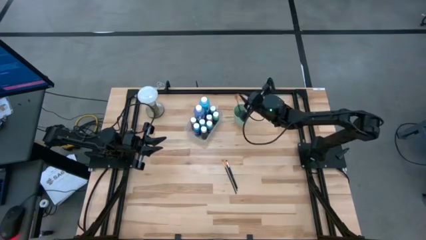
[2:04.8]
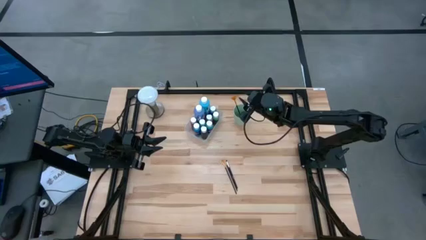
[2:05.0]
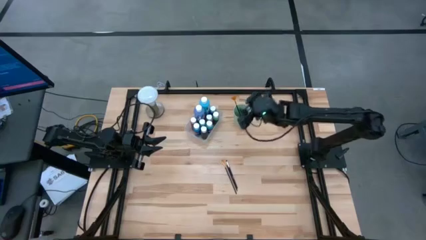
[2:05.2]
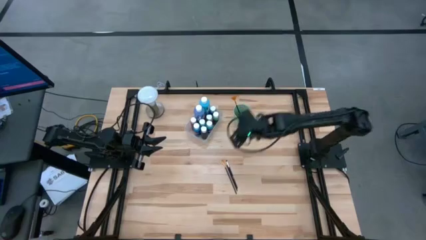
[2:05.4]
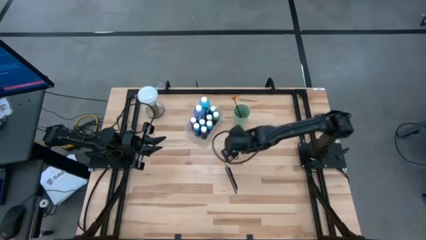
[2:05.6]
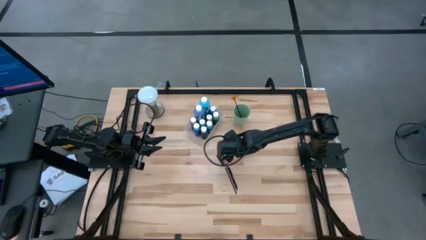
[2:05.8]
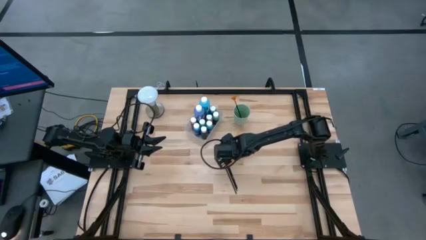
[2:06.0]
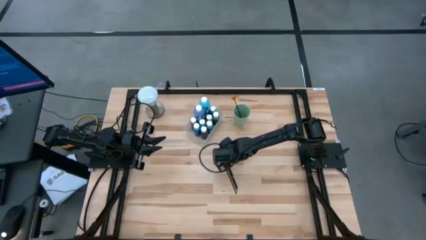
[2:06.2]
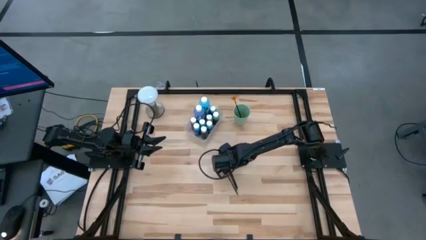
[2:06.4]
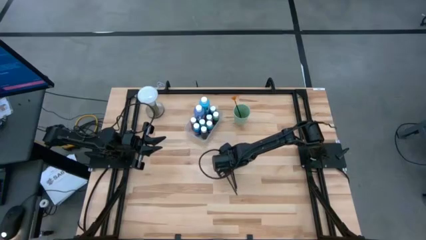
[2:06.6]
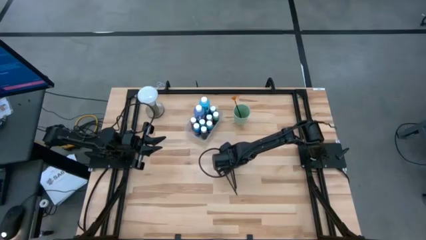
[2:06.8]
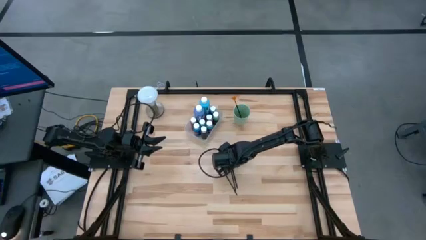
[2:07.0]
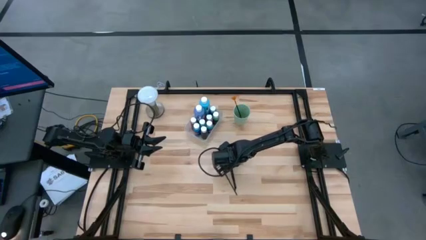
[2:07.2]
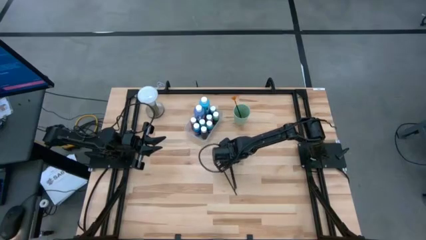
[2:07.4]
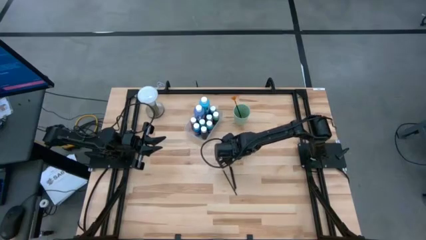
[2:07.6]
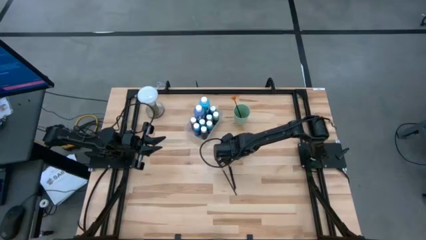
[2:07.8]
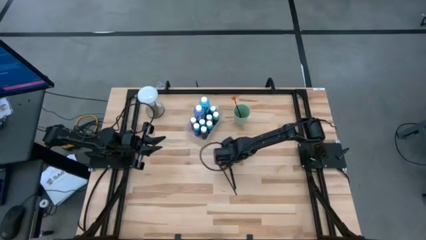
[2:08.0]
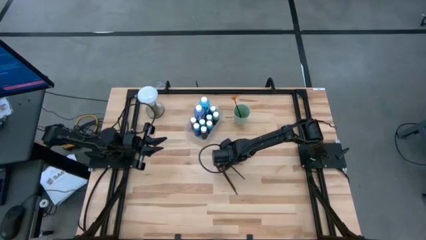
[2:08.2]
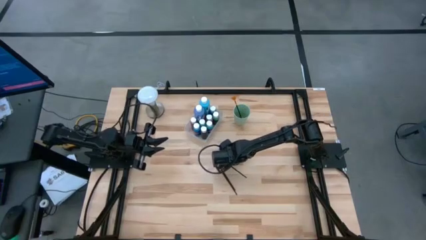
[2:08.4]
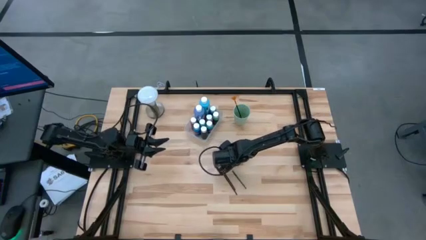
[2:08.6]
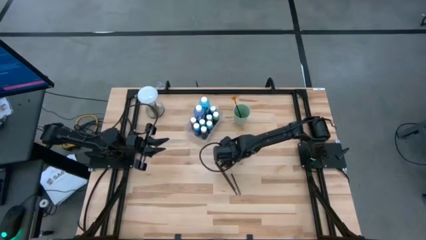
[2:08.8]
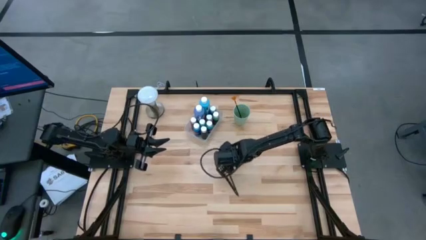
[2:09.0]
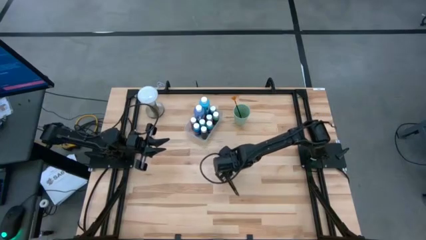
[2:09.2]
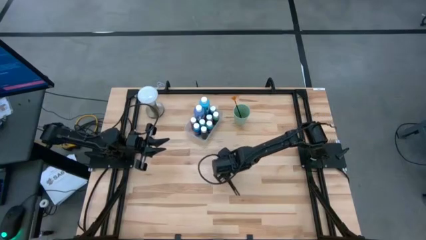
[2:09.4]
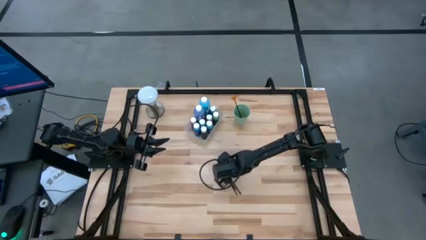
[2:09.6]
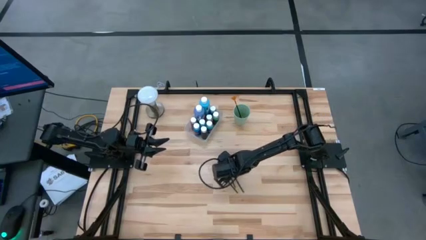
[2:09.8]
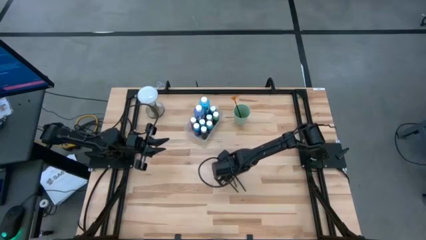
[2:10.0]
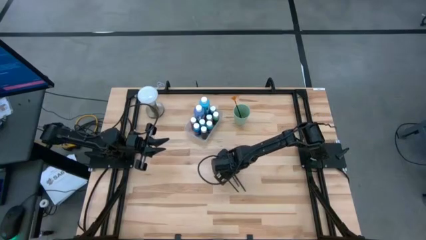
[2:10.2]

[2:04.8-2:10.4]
Task: Pick & Place Paint Supplies
Put the black paint brush into the green cup

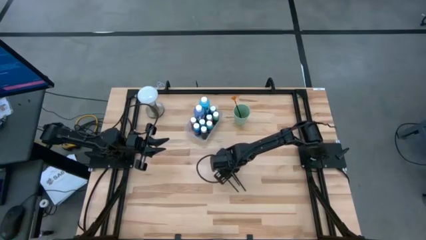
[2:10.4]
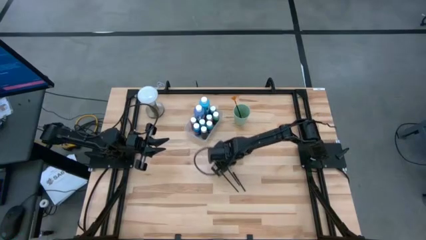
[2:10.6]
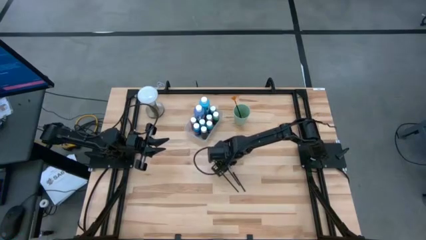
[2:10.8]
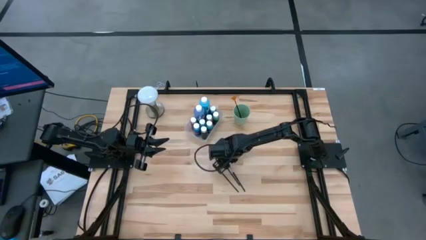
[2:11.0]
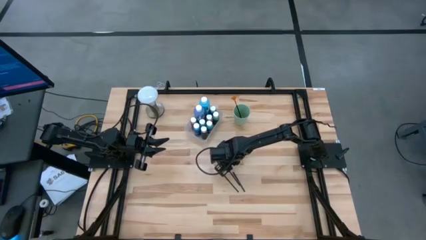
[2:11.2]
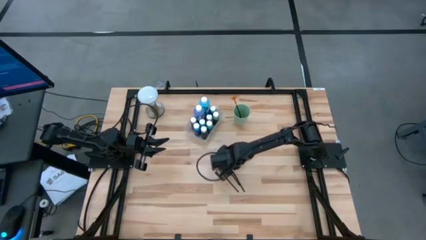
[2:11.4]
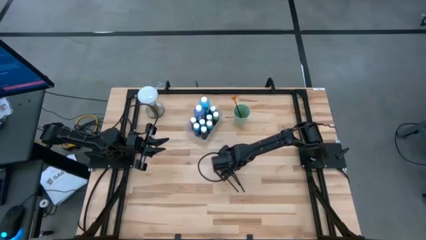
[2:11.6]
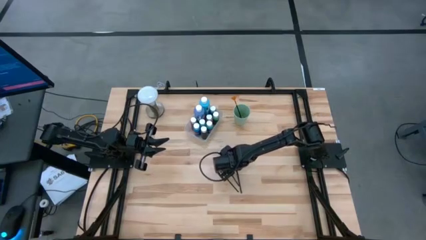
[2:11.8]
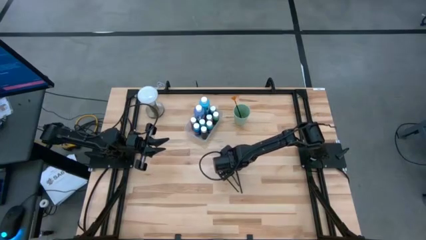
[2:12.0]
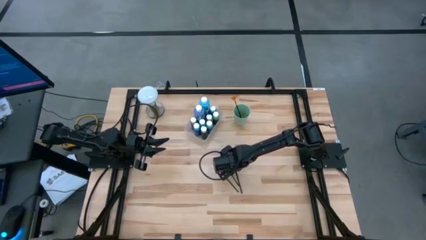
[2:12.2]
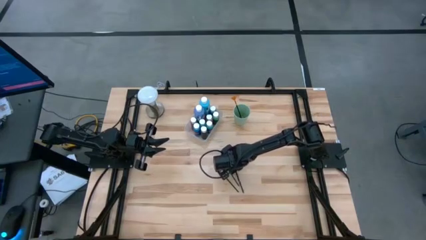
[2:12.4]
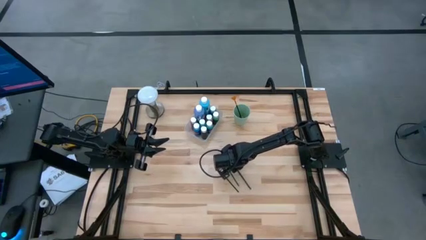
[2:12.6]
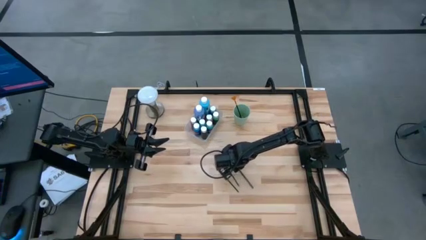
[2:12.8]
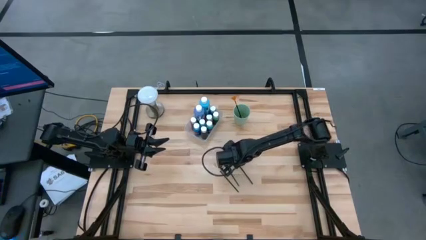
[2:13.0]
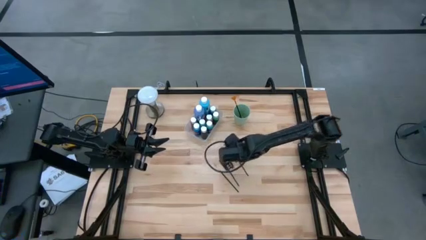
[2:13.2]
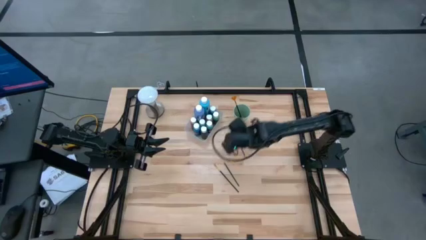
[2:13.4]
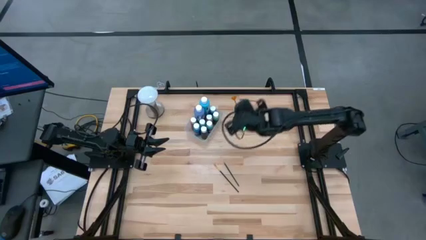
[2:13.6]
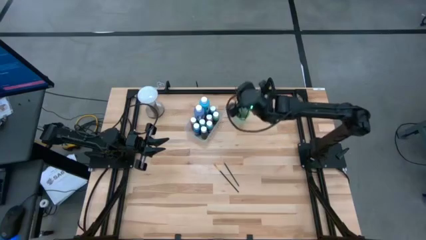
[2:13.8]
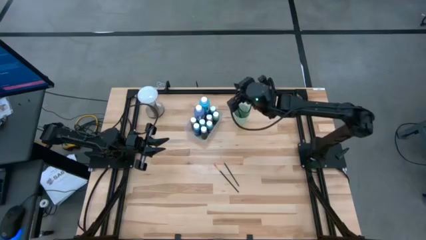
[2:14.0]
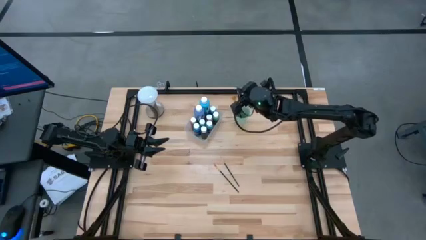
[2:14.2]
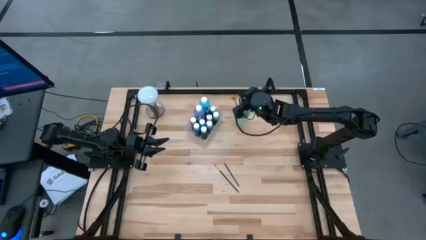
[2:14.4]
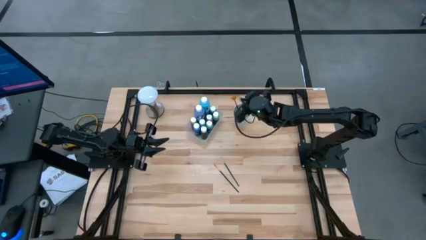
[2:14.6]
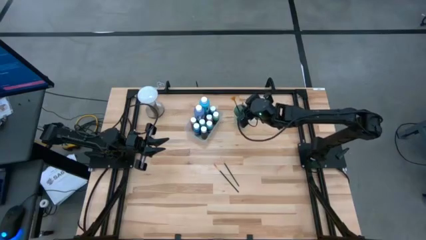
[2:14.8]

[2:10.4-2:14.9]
Put the black paint brush into the green cup

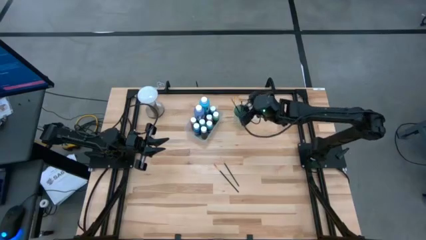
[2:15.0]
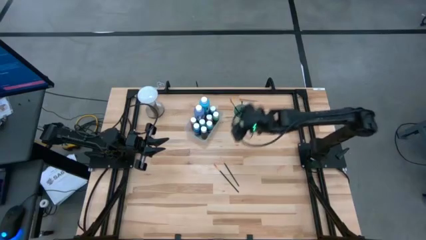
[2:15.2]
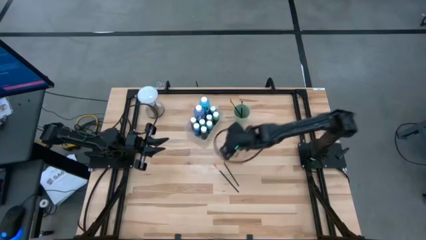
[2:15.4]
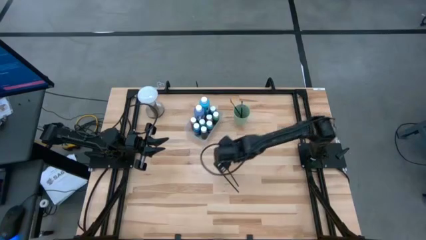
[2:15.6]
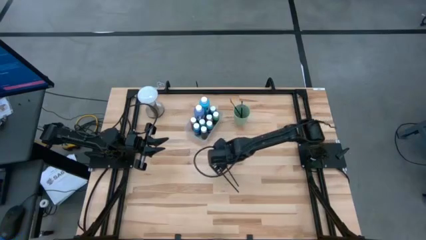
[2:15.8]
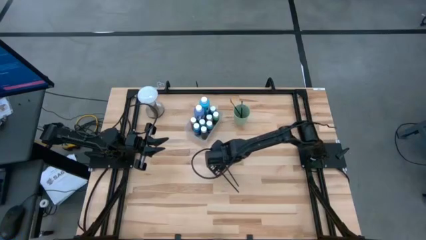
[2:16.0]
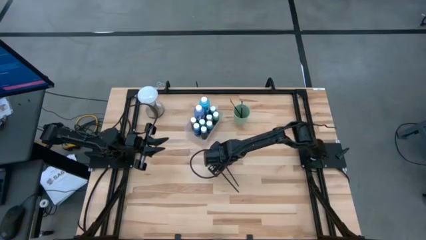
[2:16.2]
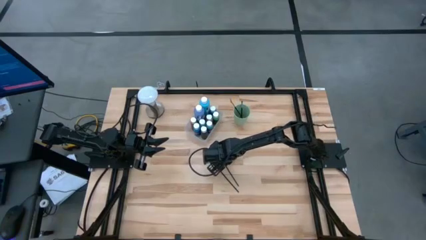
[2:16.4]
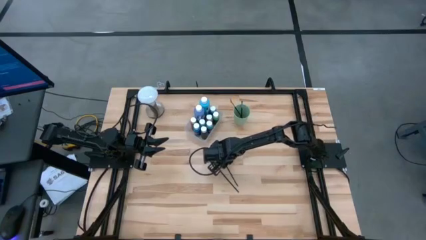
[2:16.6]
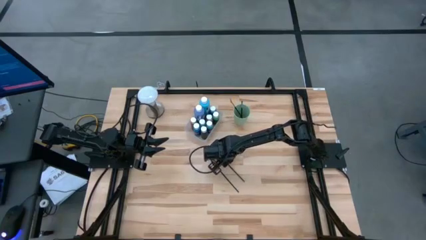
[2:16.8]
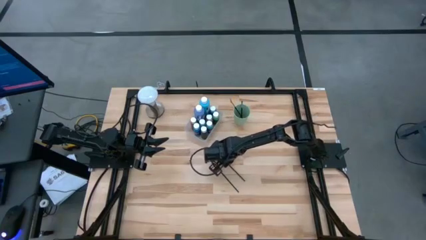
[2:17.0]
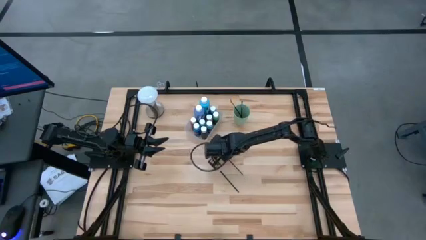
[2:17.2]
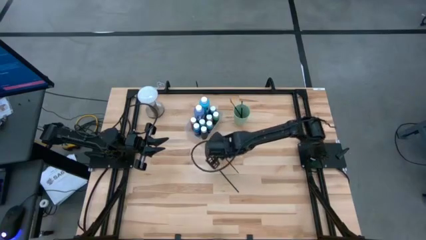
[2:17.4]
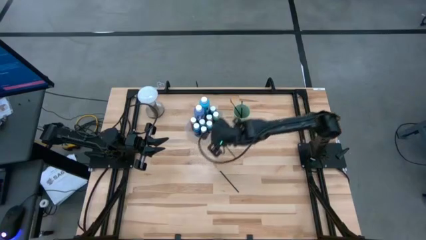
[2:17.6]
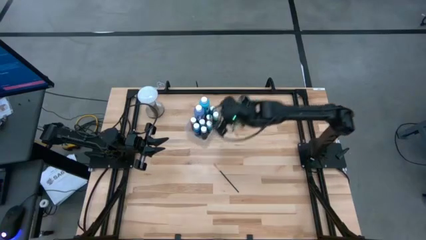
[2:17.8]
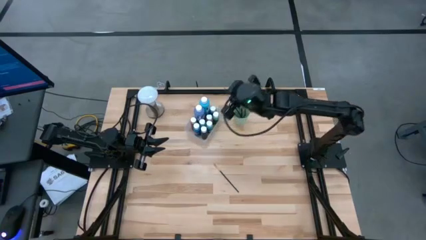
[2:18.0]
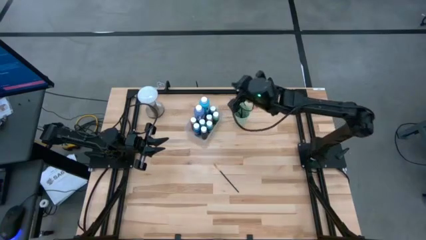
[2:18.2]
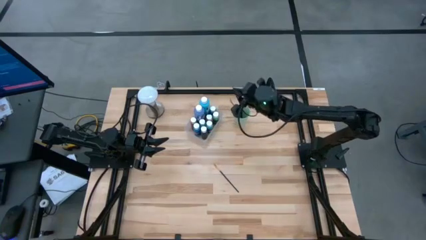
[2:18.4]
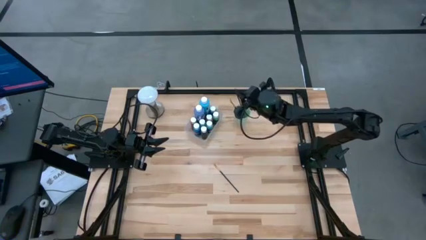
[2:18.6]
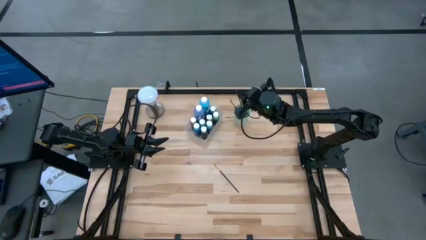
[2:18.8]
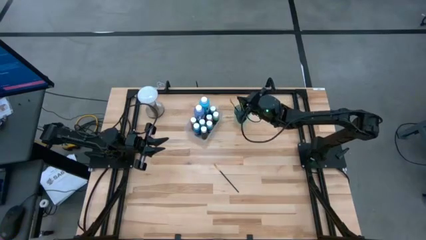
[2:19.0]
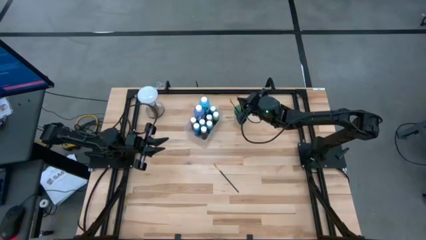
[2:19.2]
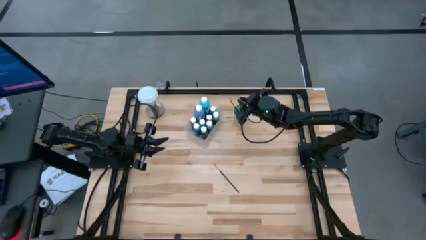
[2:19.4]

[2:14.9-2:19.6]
Put the right orange paint brush into the green cup

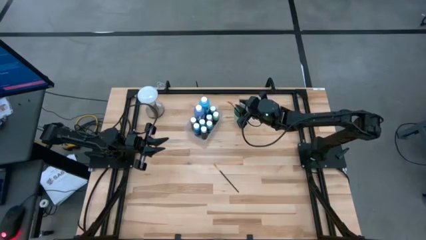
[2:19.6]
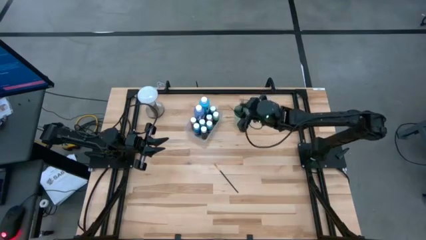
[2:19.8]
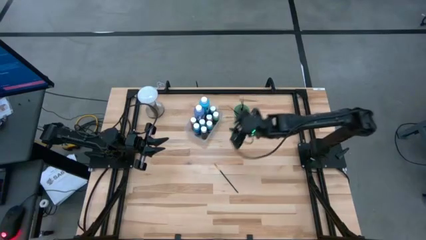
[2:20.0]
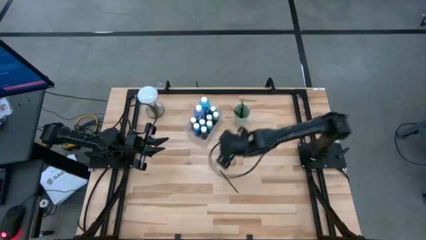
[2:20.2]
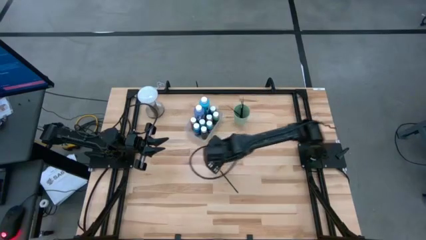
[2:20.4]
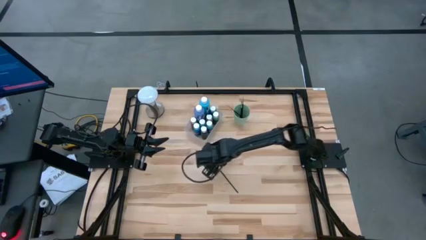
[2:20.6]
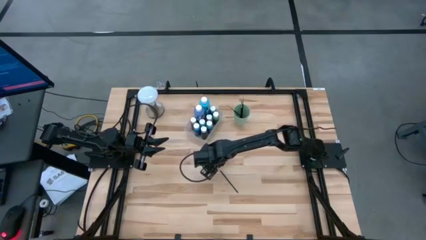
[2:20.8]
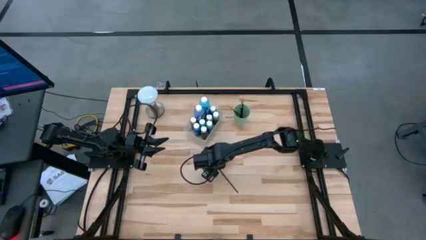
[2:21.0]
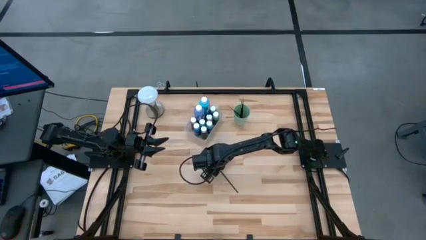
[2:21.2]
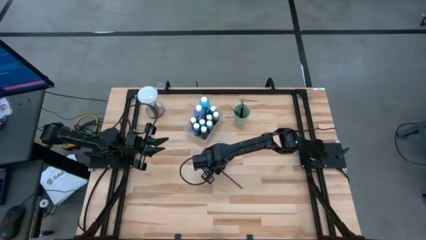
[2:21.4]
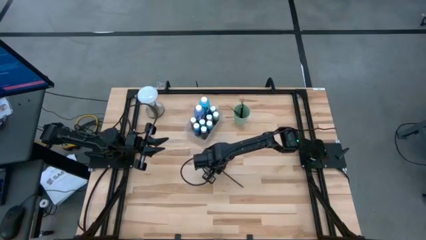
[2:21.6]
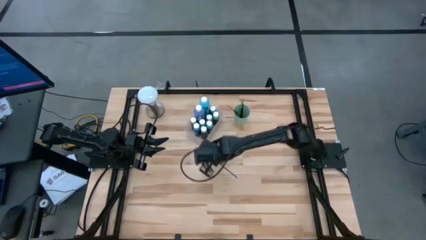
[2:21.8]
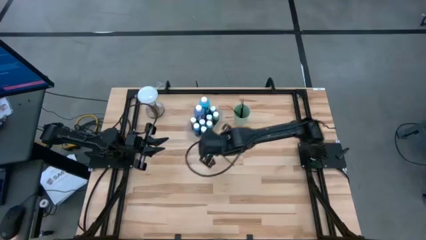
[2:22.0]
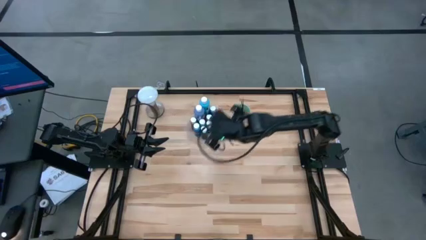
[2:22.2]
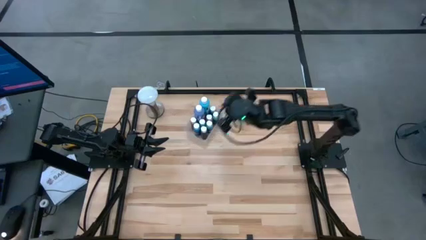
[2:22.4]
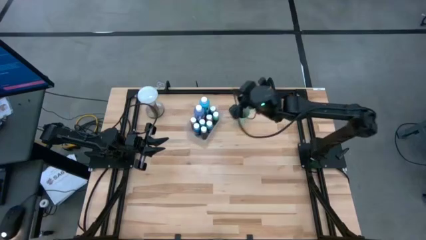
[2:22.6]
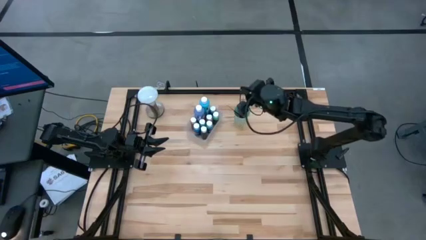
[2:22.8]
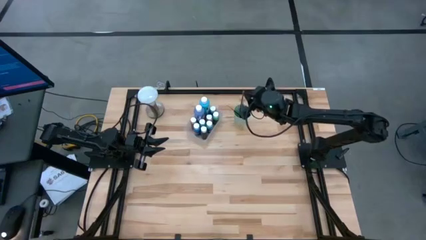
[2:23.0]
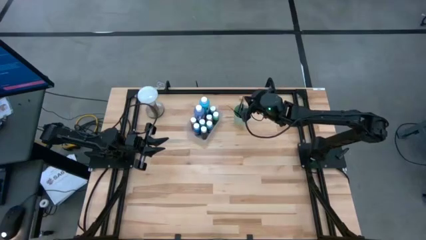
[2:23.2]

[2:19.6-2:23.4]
Put the orange paint brush into the green cup
